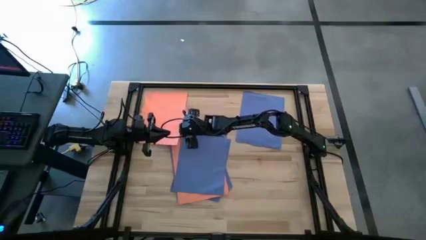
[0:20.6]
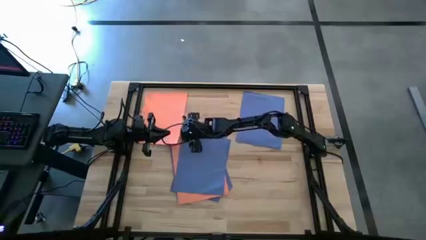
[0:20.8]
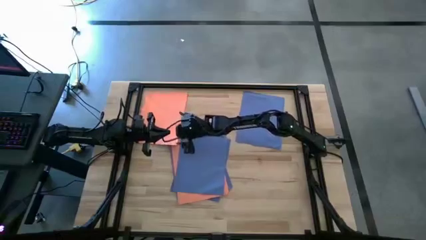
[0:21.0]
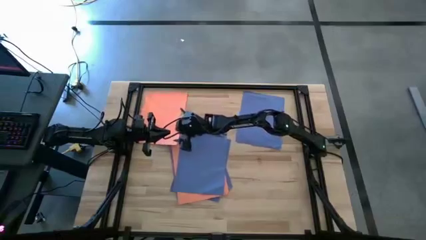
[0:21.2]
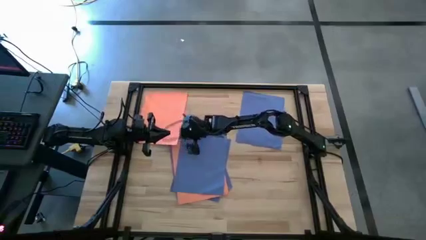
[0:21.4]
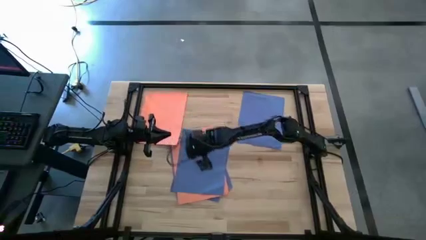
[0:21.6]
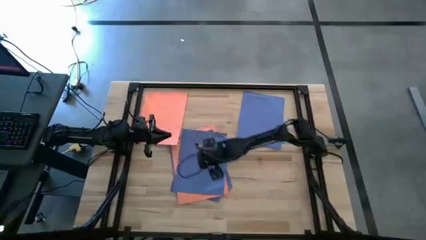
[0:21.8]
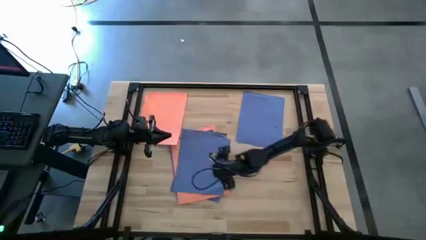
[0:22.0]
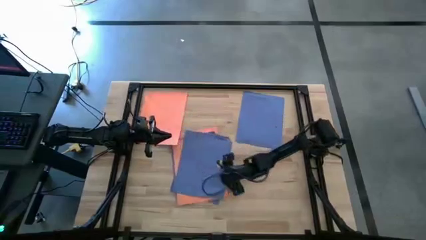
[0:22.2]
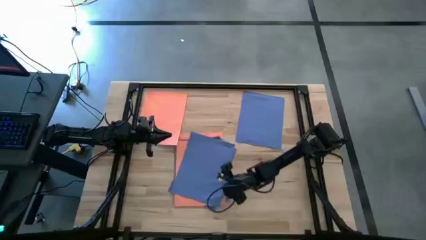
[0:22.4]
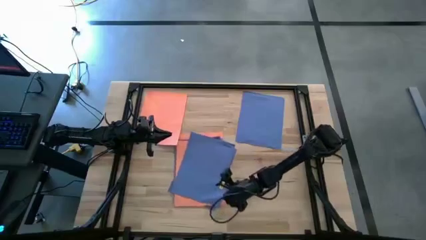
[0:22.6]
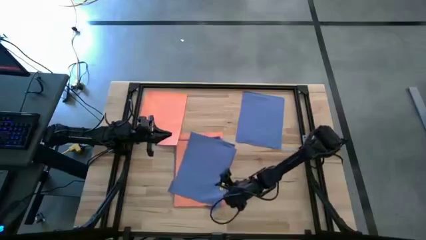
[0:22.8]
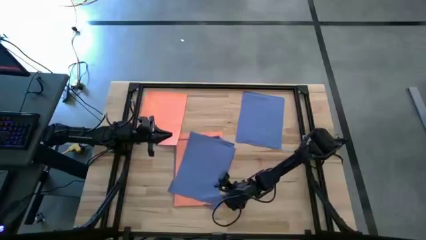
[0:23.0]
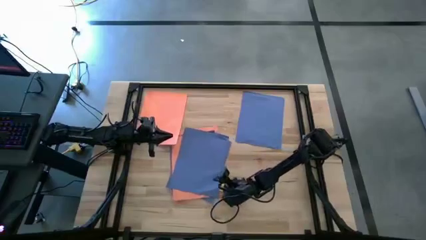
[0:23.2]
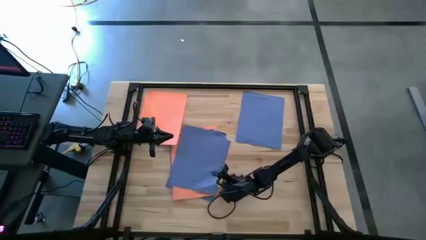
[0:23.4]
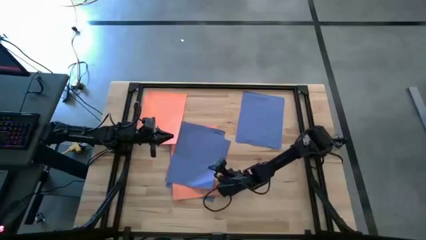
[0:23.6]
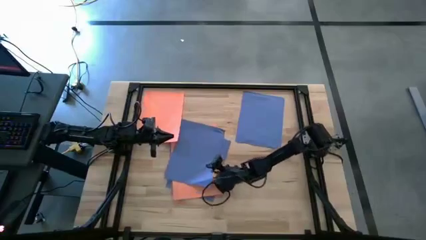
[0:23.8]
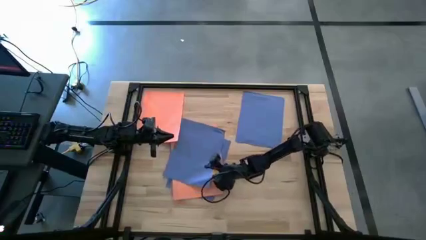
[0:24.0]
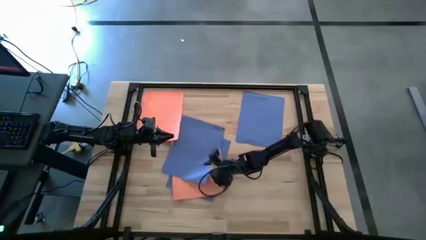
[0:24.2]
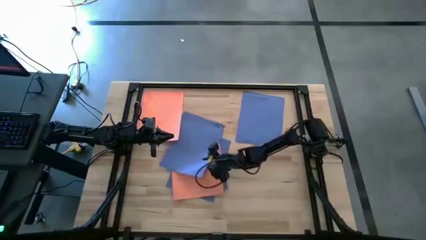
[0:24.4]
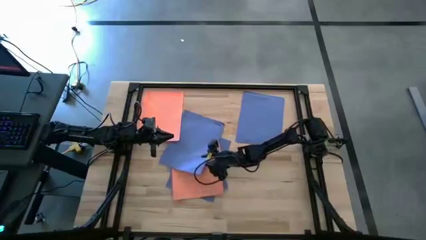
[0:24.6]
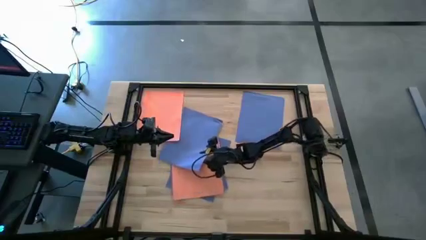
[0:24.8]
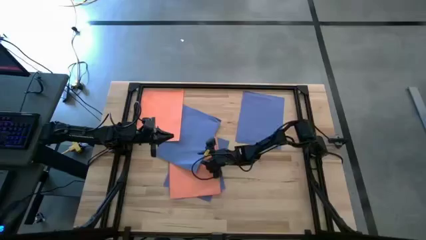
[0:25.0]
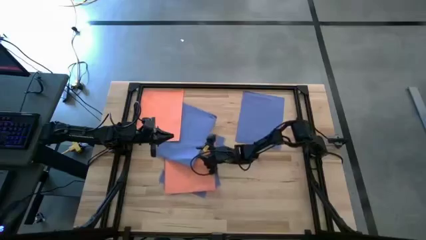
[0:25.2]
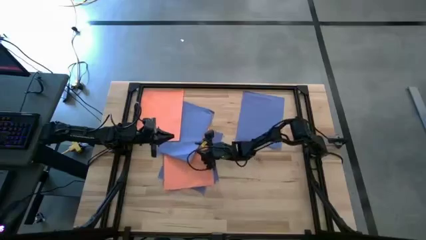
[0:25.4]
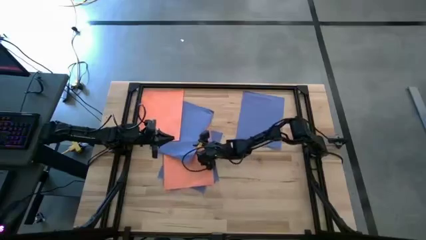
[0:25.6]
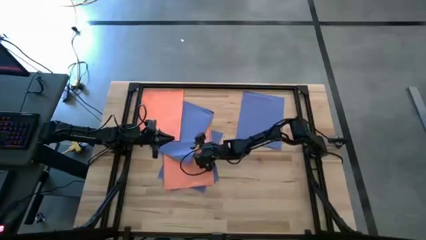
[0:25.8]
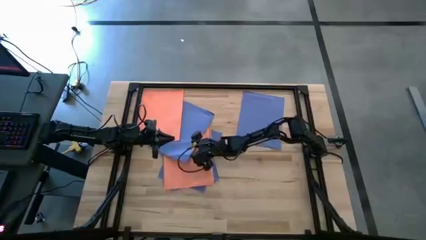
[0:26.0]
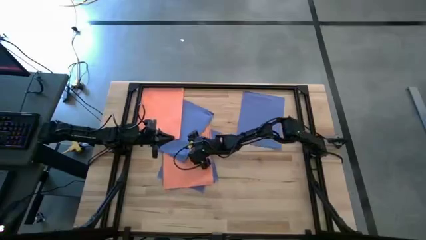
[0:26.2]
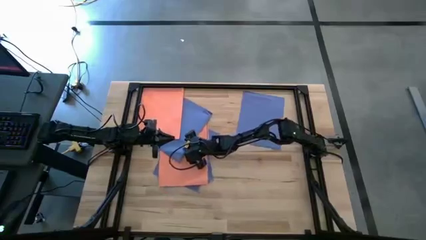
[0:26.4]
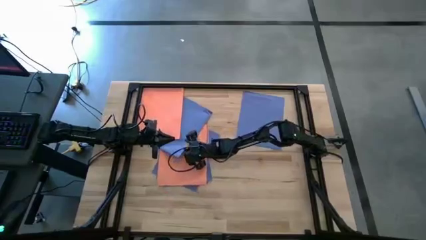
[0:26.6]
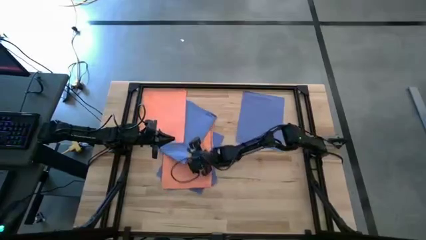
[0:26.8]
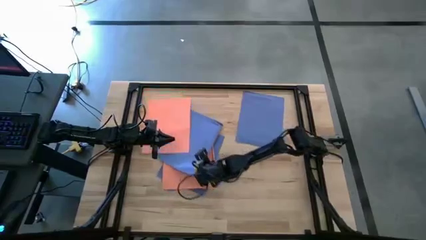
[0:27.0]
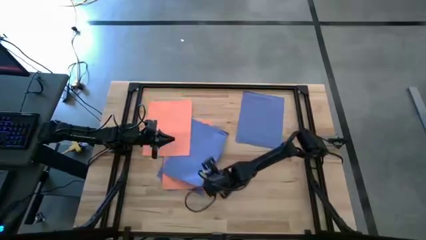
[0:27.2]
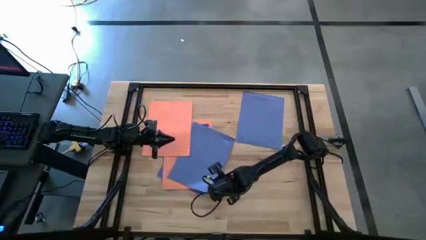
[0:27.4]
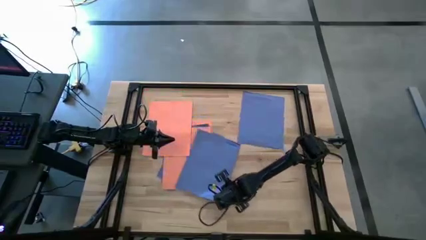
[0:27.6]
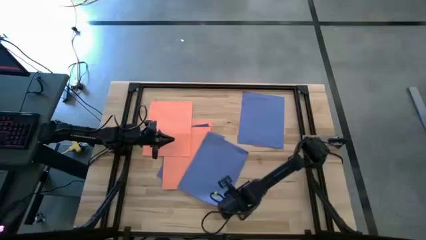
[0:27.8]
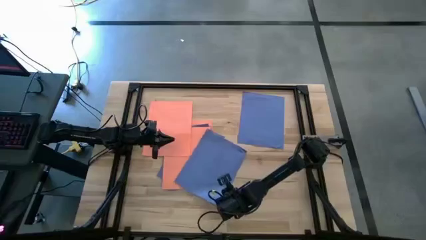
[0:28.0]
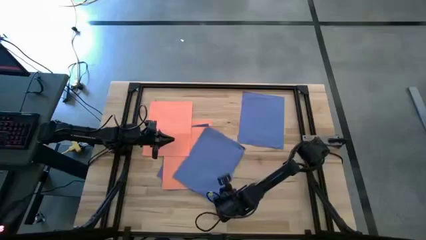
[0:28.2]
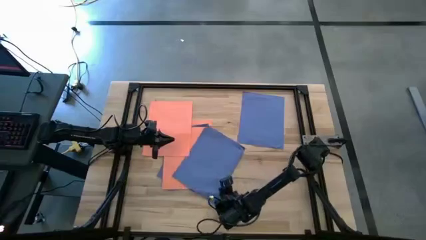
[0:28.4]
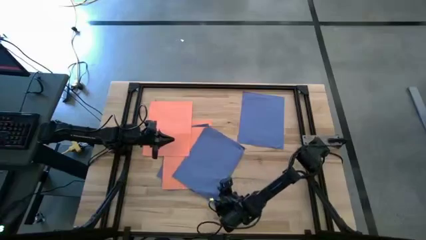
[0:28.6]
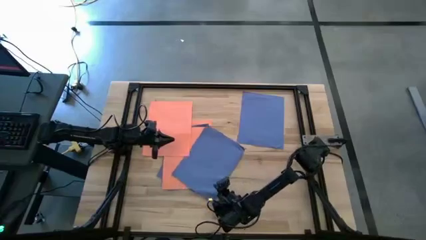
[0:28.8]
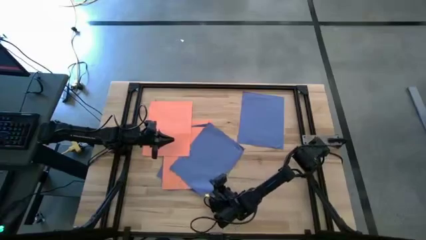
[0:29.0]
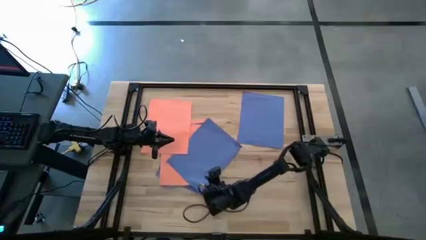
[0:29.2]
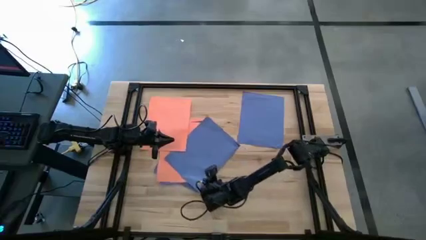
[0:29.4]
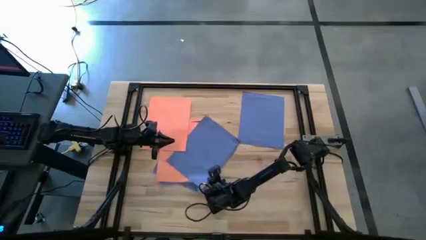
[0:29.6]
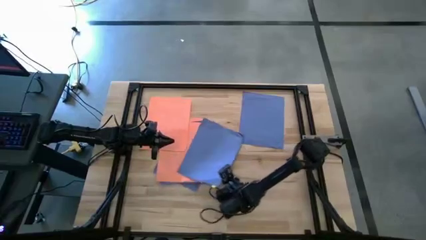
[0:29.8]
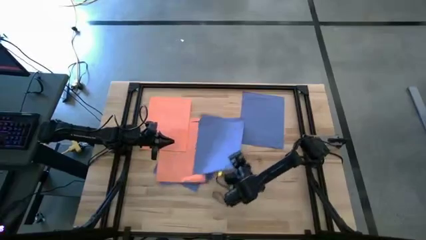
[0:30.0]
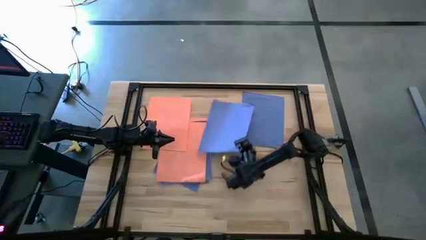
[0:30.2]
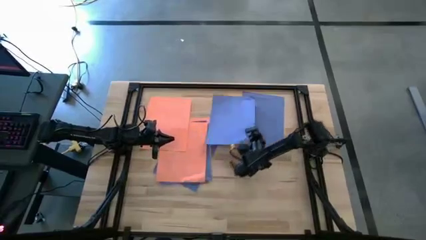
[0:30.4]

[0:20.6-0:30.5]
Task: Organize paper
Stack the blue paper on top of the blue paper

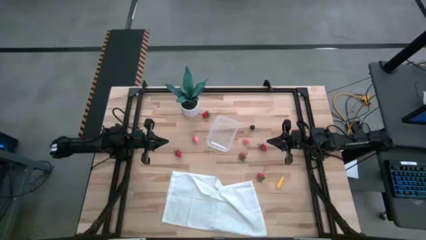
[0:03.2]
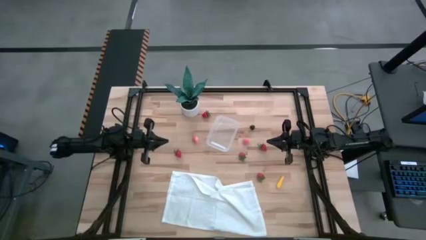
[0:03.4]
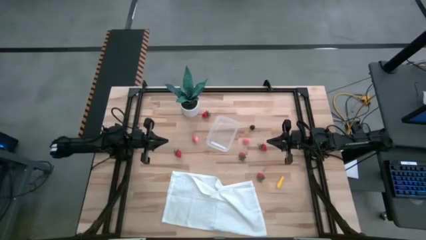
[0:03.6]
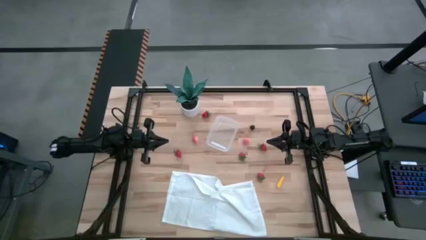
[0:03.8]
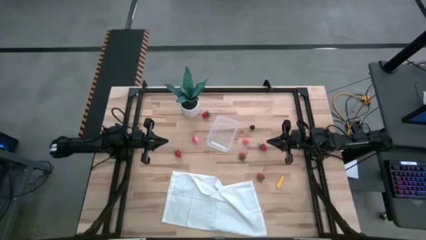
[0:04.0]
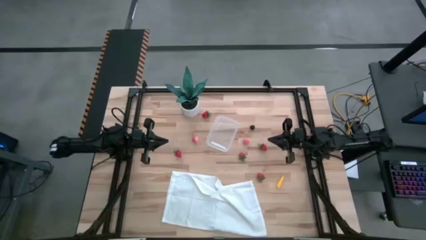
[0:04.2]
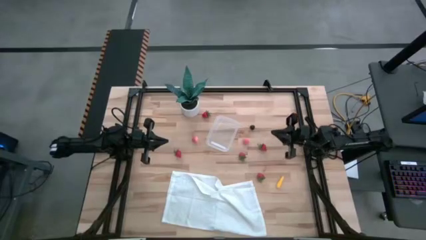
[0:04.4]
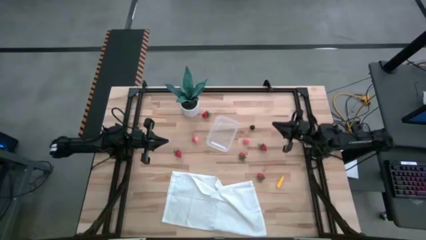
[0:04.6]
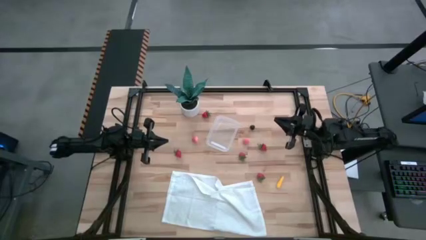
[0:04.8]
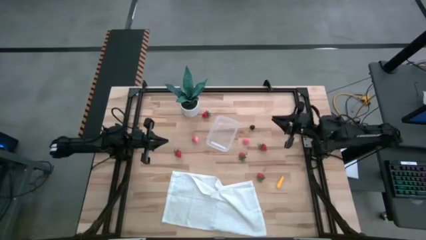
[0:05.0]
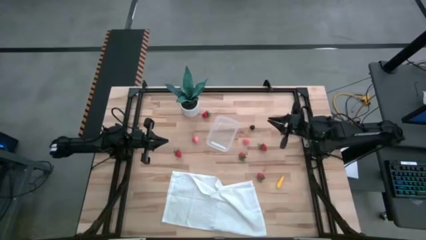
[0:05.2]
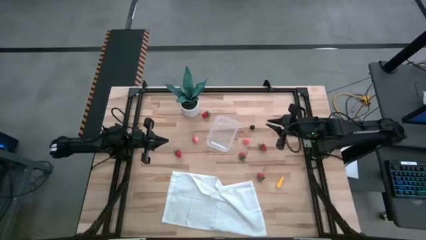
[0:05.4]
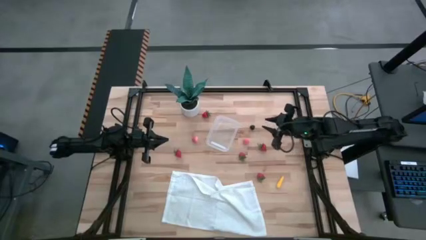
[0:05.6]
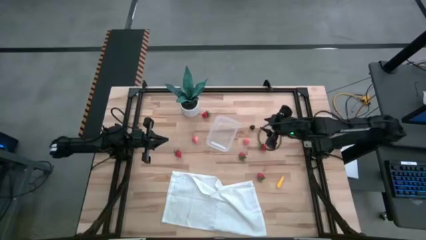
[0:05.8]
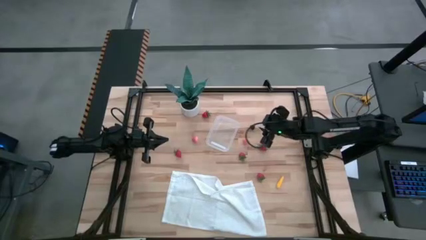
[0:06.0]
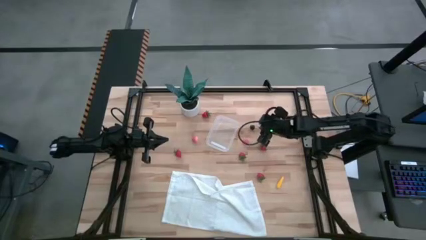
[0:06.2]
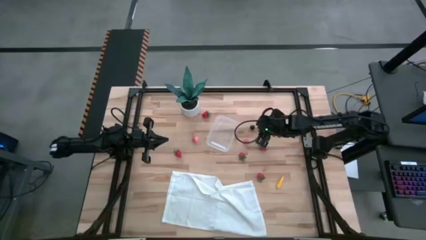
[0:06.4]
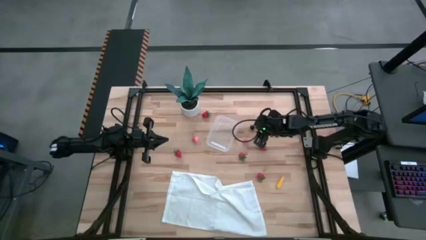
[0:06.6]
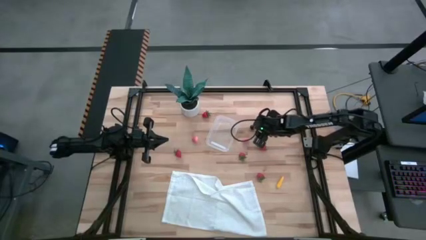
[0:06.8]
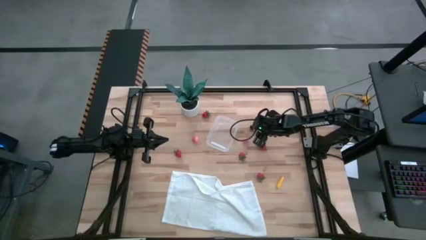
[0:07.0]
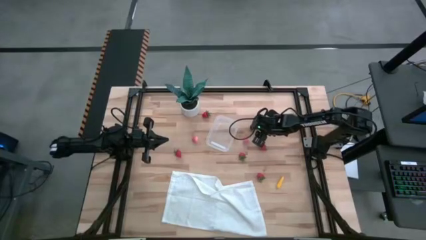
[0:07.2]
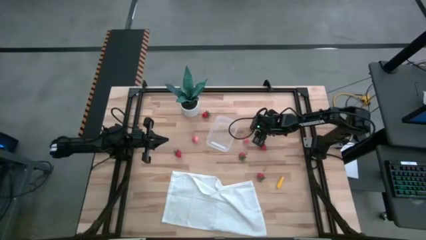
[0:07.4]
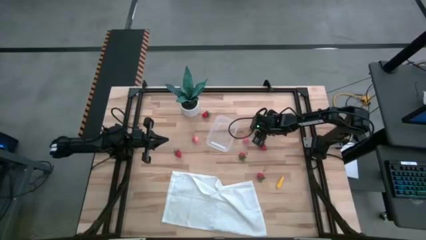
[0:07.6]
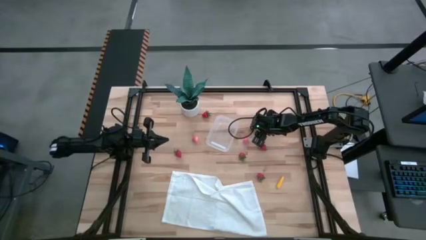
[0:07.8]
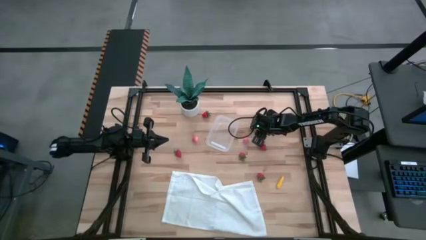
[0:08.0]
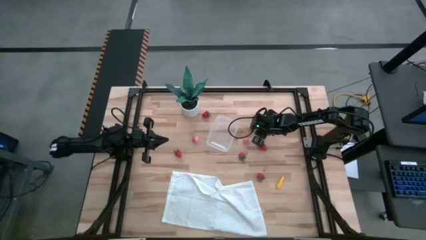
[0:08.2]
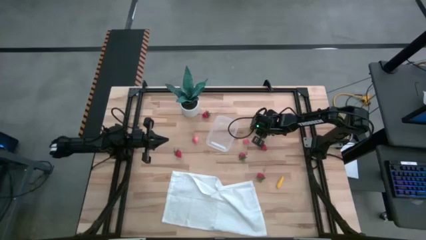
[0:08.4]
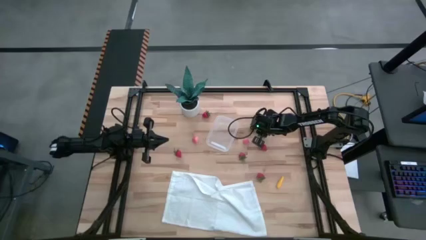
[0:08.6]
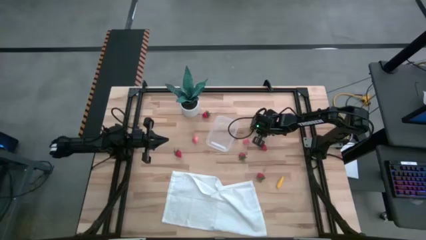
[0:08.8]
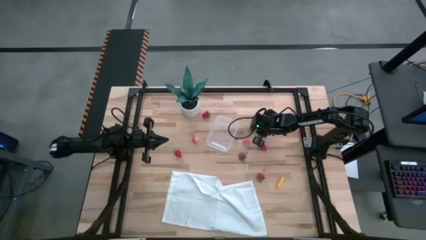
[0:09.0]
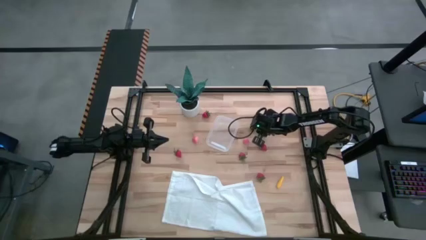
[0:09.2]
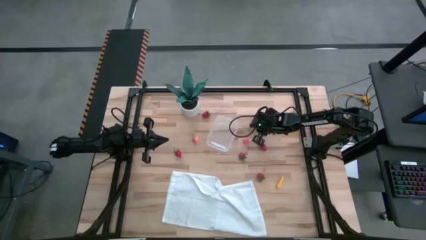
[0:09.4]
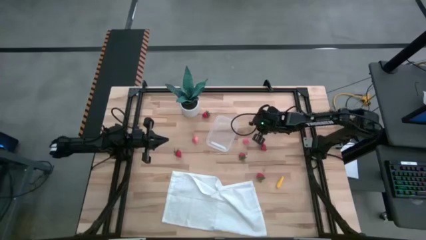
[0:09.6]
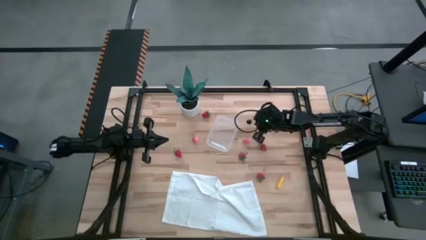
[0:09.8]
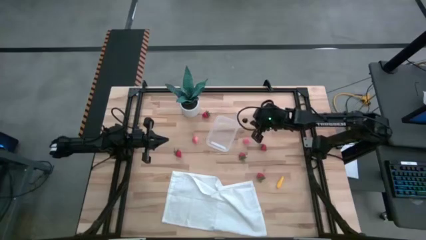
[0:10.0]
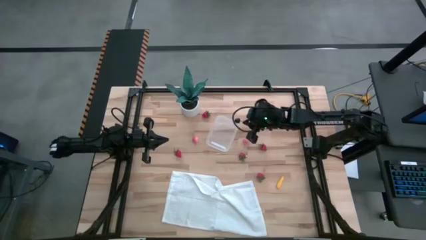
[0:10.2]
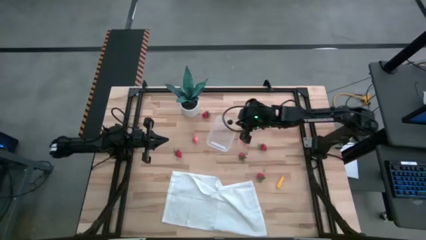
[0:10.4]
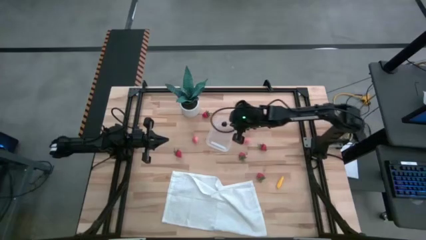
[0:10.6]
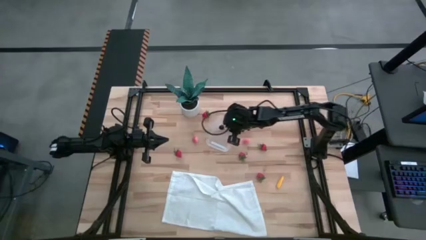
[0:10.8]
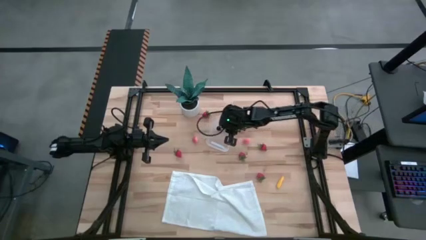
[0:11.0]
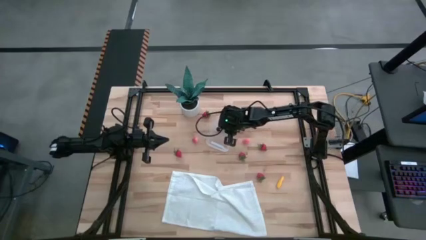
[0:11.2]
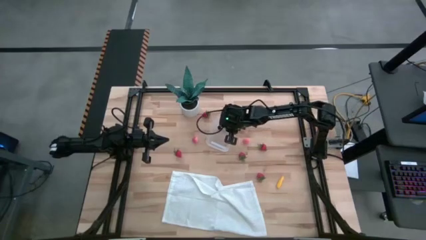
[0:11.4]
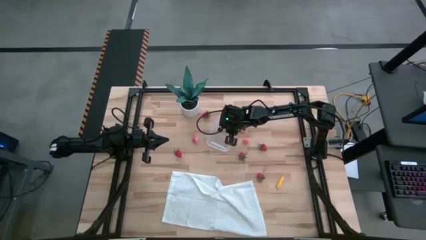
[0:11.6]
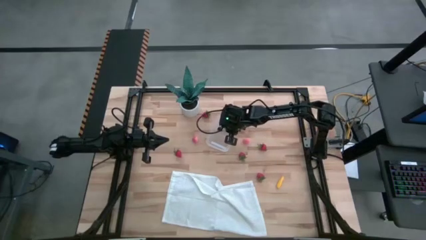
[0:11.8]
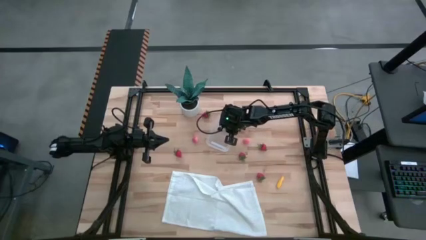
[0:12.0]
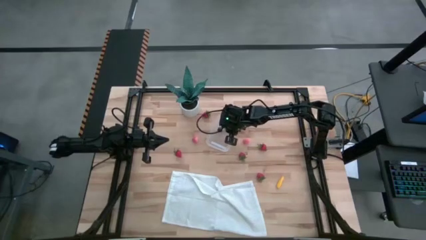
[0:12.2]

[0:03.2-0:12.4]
Task: Pick and placing Produce into tupperware
Put the black cherry into the transparent bin
